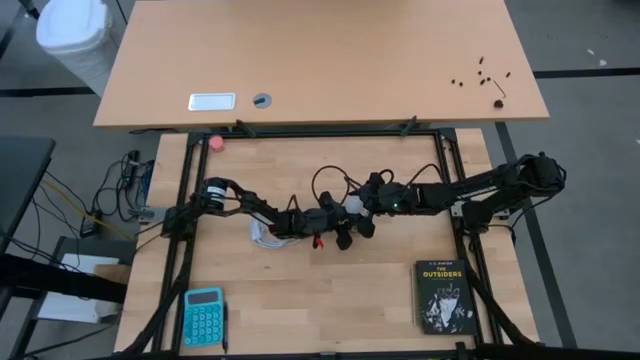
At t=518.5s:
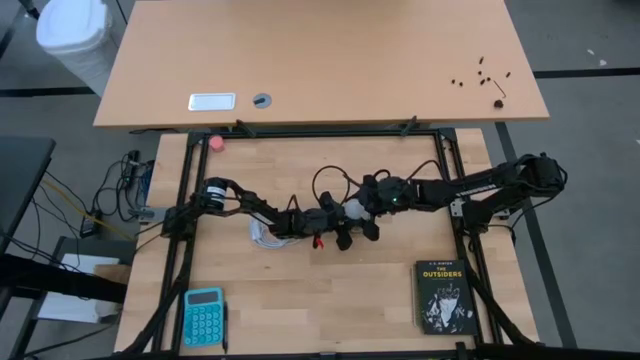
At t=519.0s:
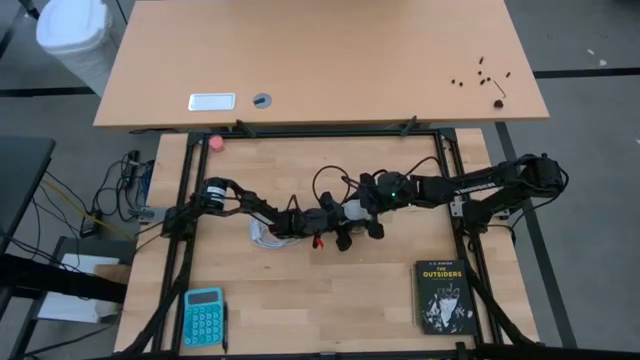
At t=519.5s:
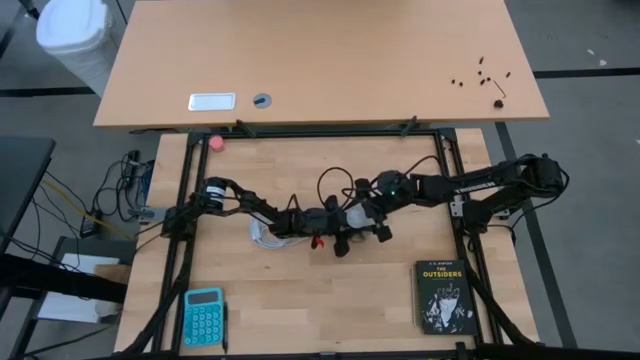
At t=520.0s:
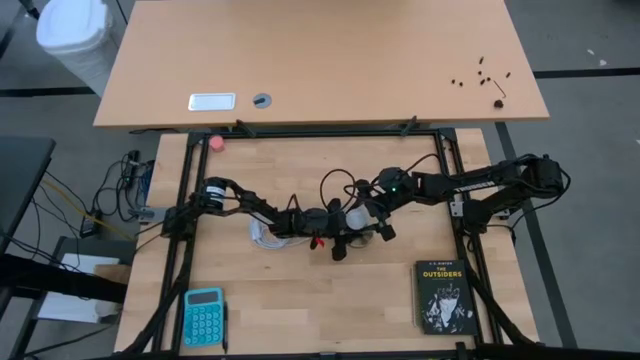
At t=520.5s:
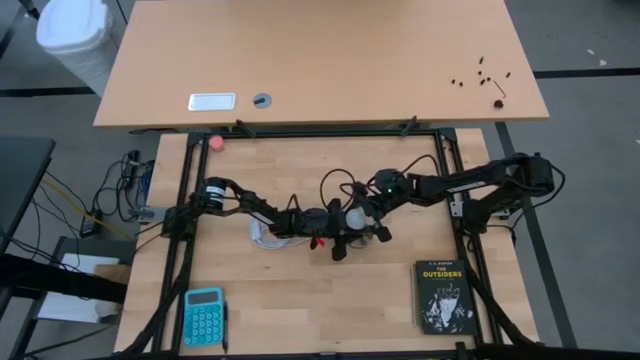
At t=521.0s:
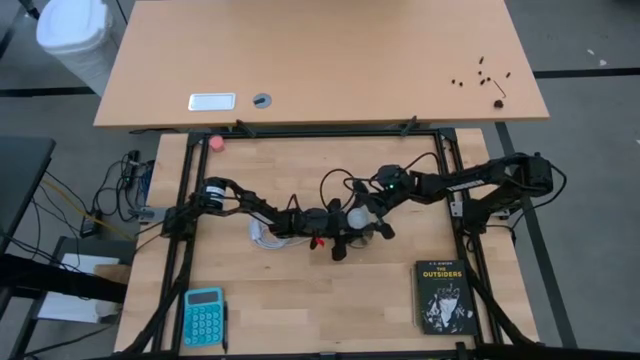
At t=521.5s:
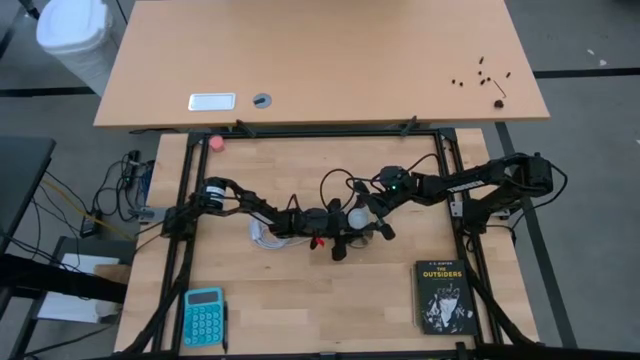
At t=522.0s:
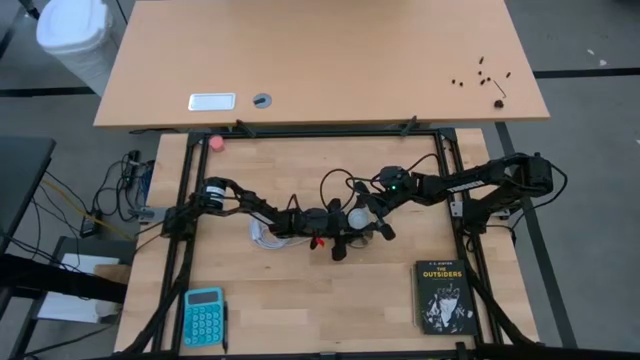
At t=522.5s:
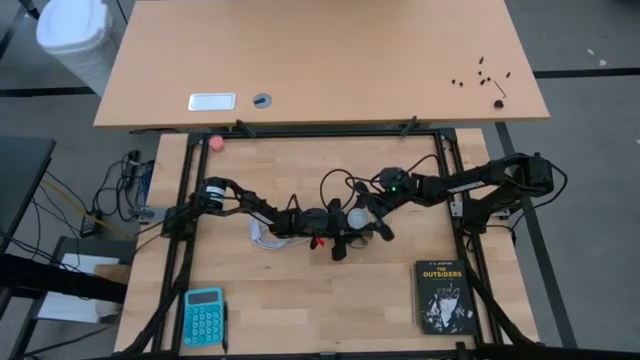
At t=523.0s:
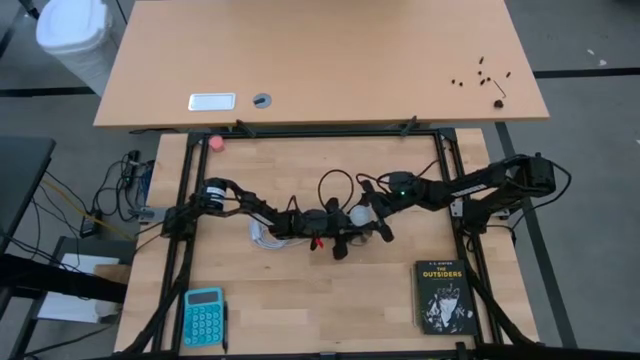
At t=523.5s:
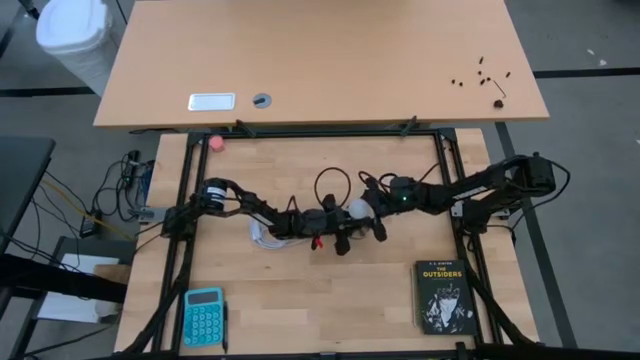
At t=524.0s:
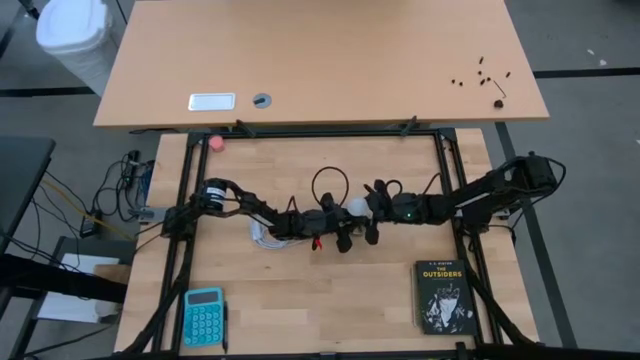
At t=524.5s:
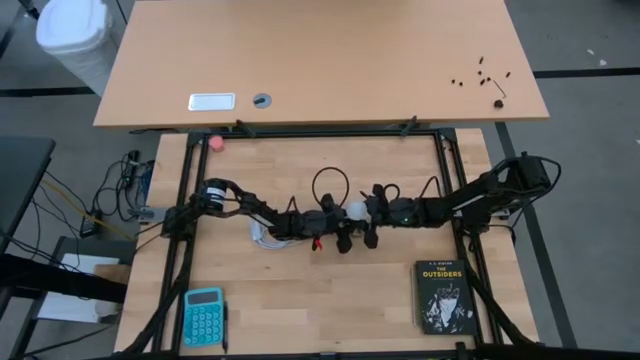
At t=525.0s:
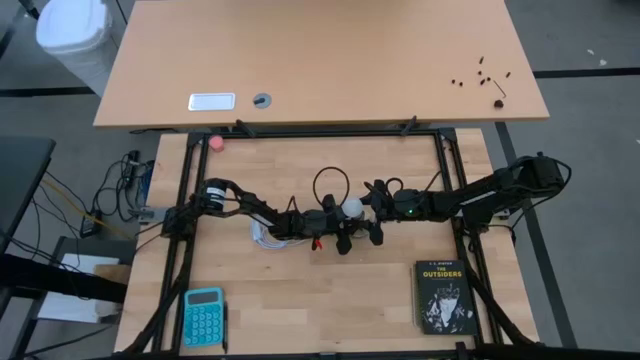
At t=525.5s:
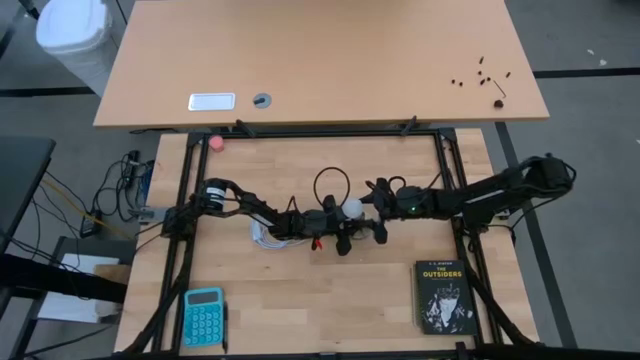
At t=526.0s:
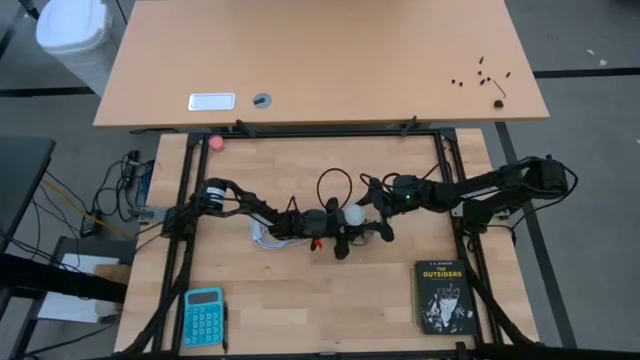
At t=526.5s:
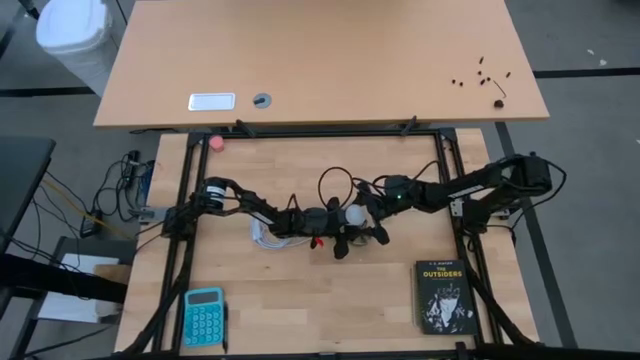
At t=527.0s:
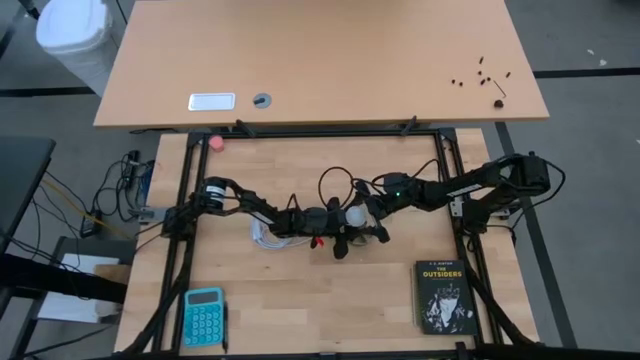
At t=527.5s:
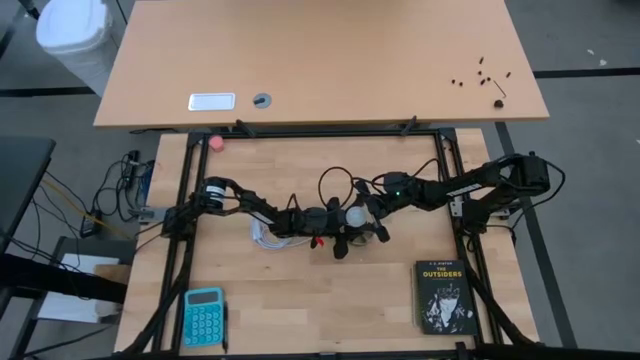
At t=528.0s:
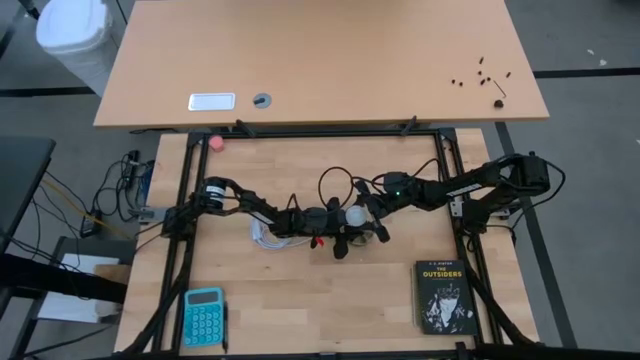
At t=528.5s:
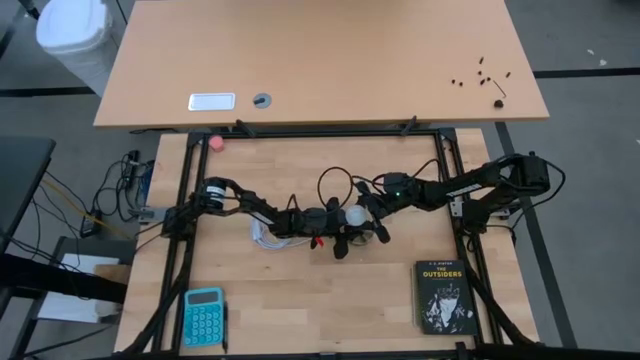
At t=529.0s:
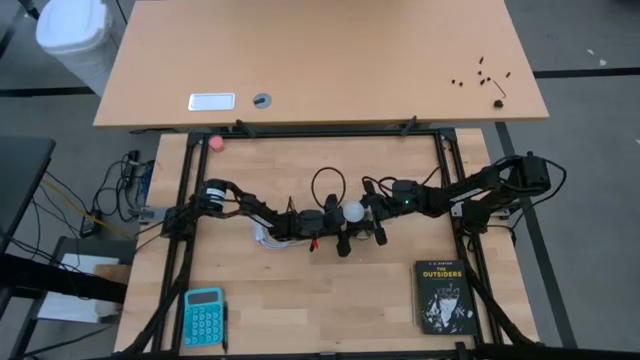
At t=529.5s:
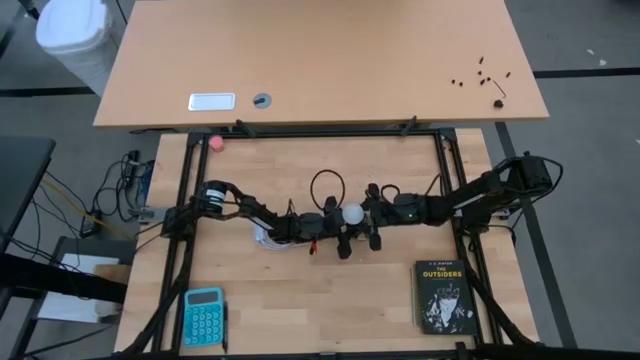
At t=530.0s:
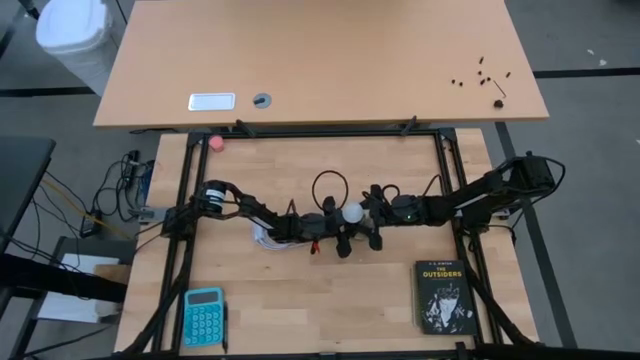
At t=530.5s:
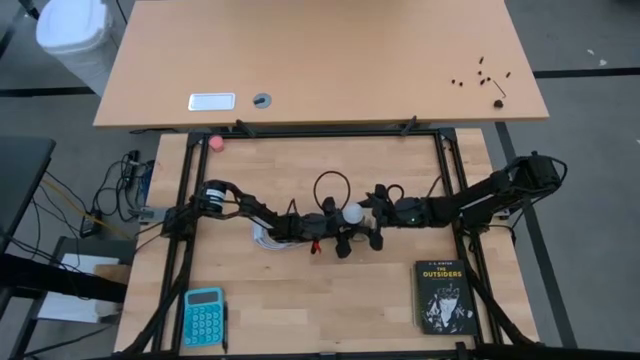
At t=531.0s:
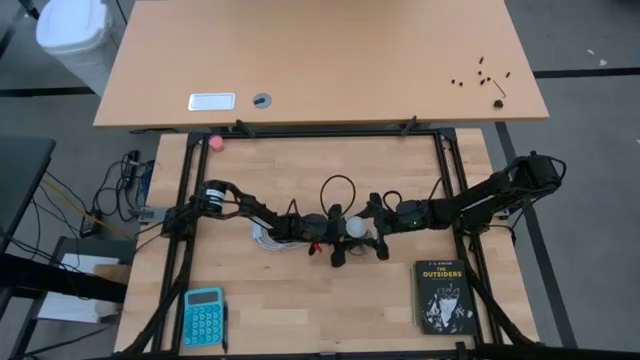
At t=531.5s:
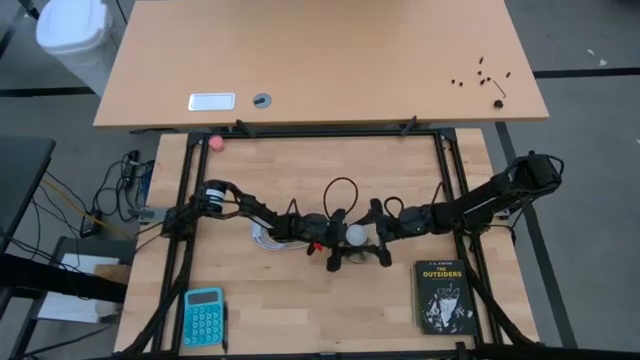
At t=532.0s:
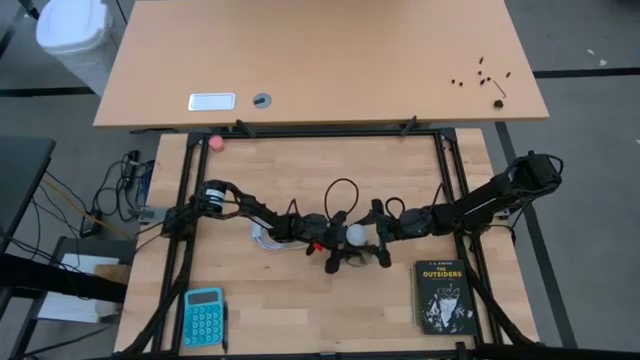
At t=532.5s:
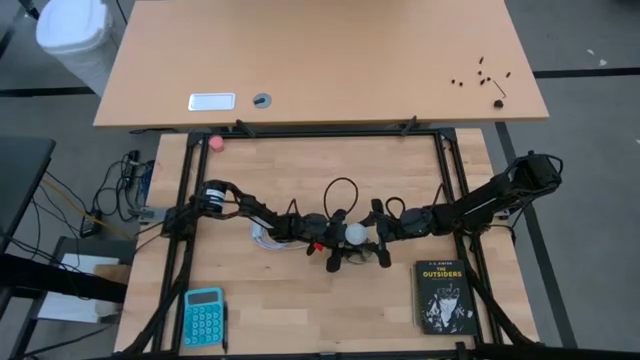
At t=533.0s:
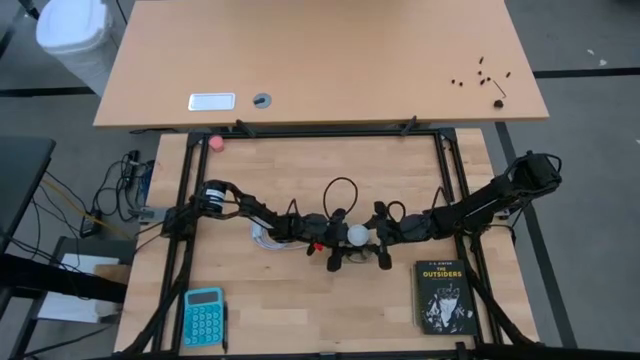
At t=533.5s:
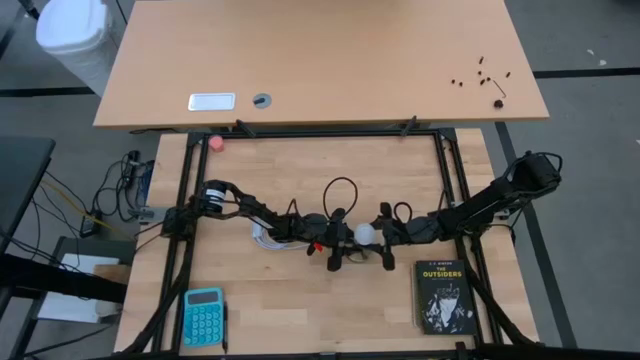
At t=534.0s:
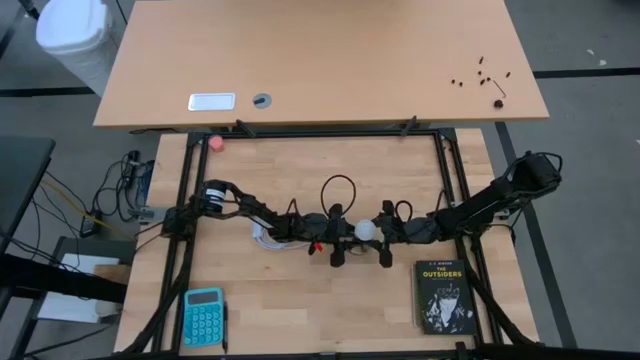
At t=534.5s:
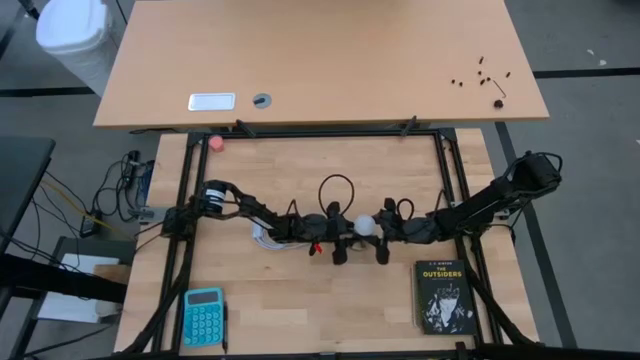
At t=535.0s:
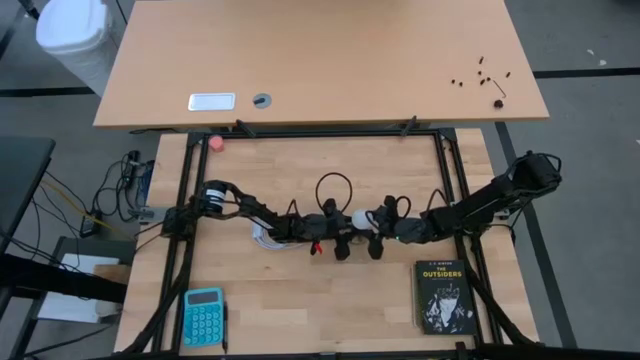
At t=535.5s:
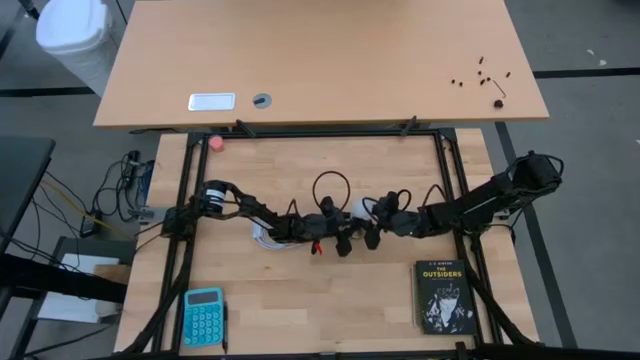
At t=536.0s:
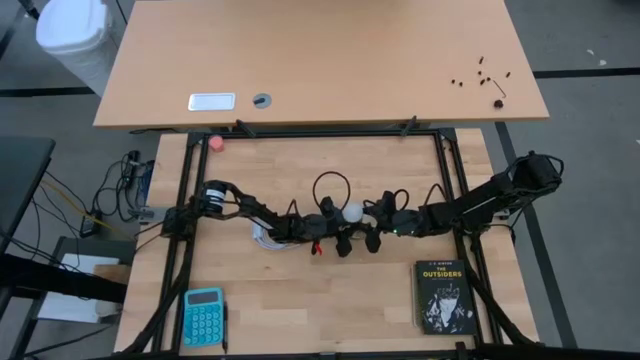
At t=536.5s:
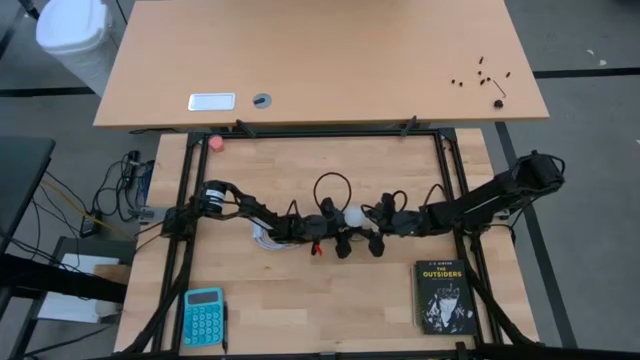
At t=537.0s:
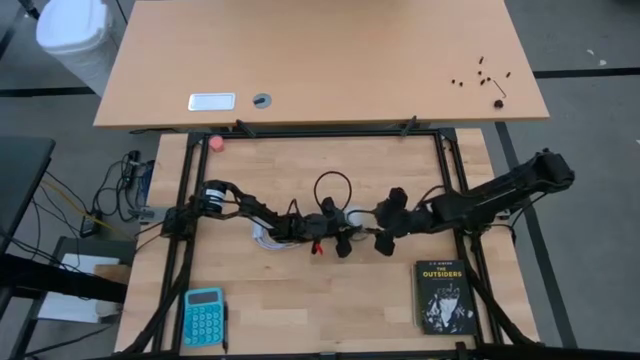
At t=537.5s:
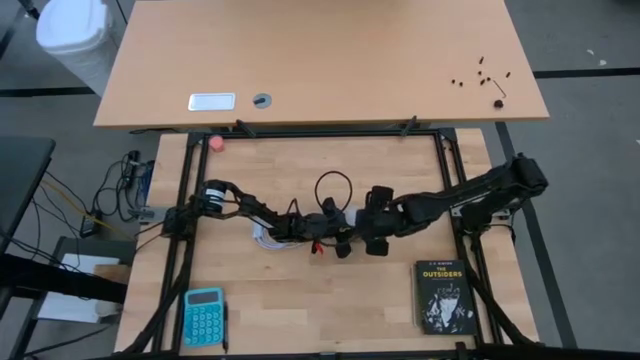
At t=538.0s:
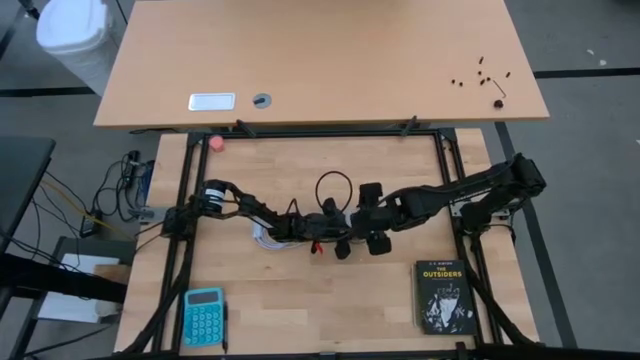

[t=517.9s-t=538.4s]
Task: Screw lightbulb
Insert the white lightbulb into the silver lamp

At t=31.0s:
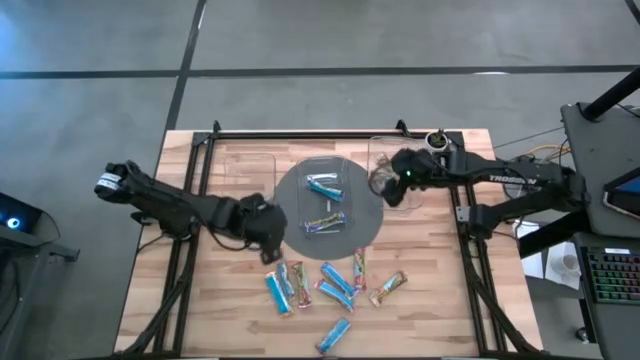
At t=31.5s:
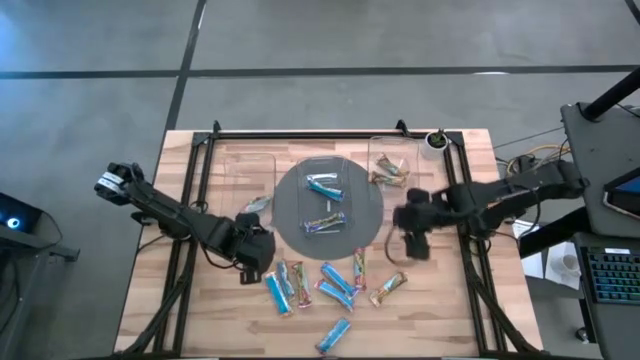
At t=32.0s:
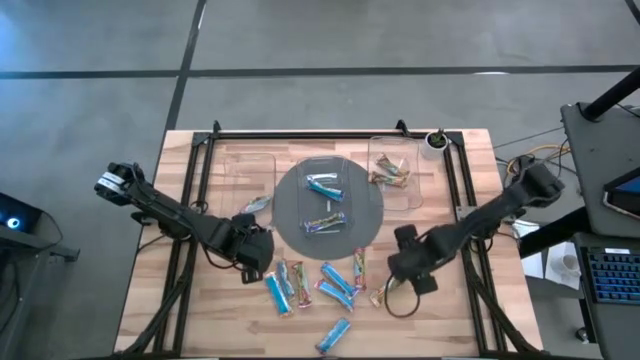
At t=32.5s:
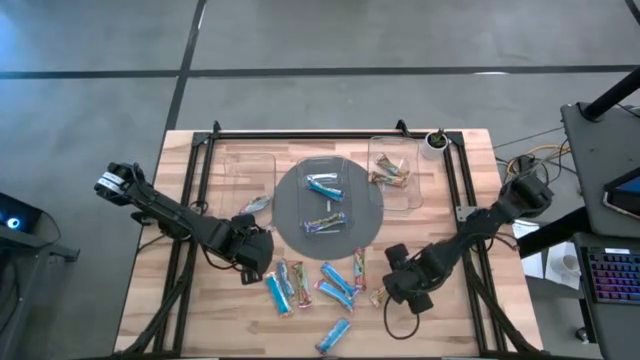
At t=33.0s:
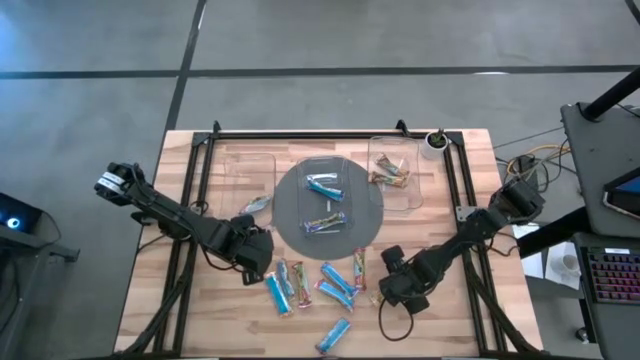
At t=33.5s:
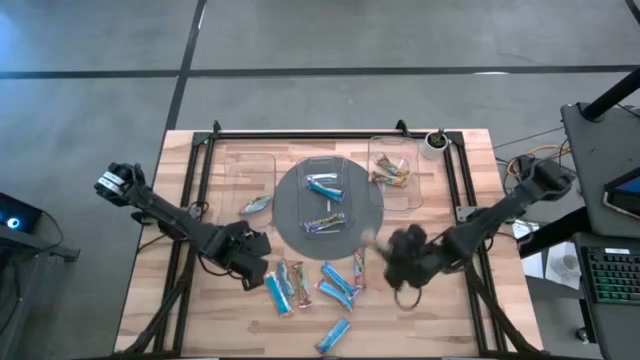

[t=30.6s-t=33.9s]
Task: Pick and place Granola Bars by type
Put the yellow granola bar into the right transparent bin
